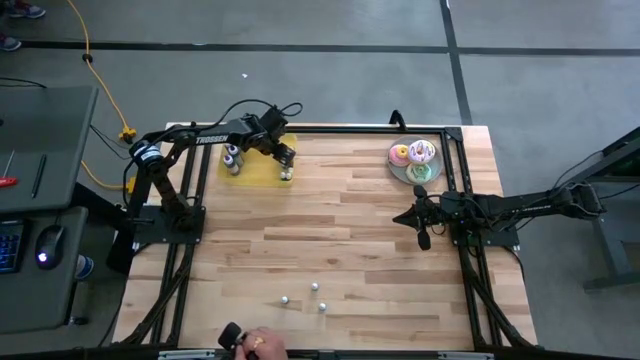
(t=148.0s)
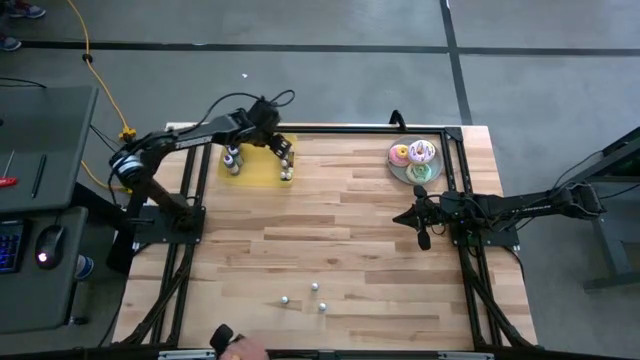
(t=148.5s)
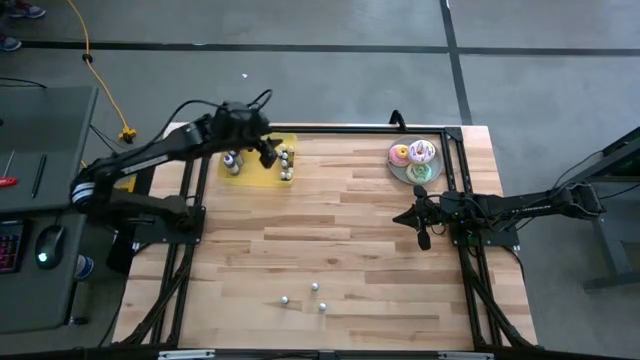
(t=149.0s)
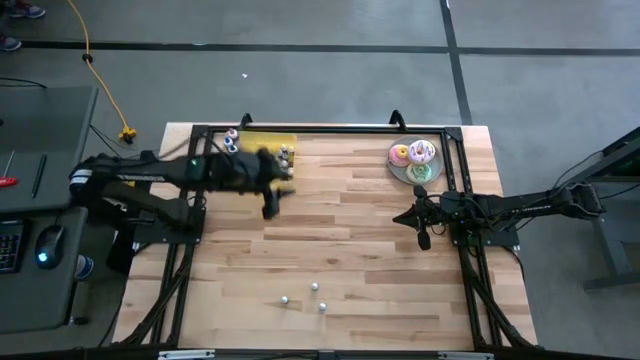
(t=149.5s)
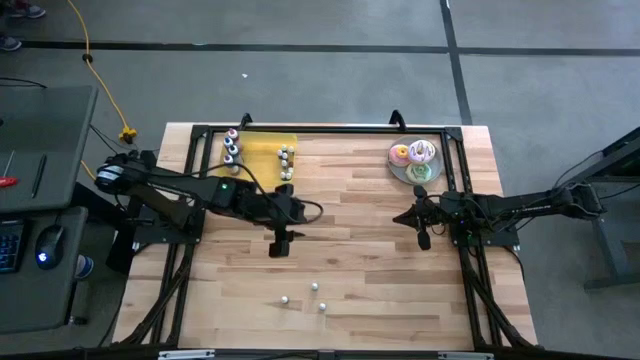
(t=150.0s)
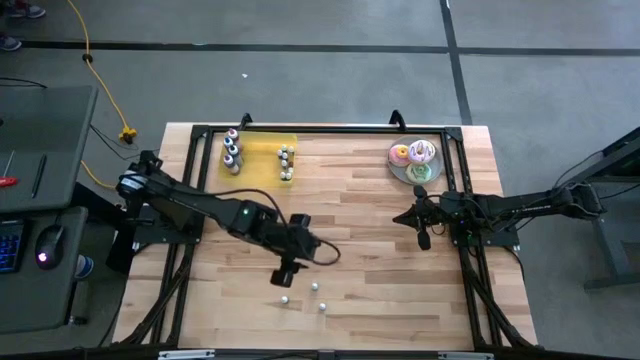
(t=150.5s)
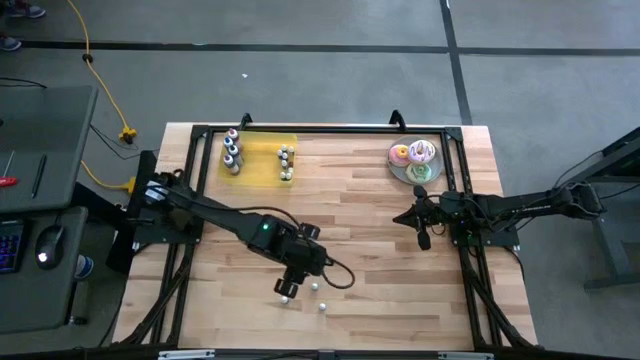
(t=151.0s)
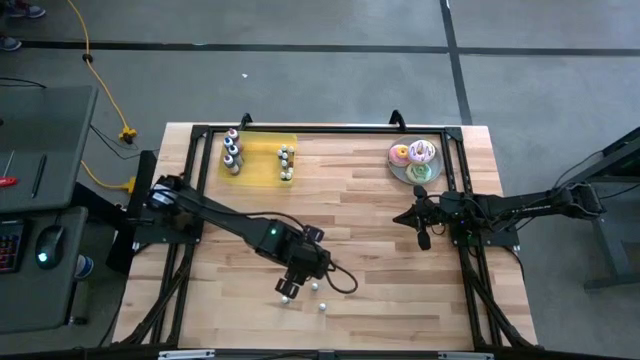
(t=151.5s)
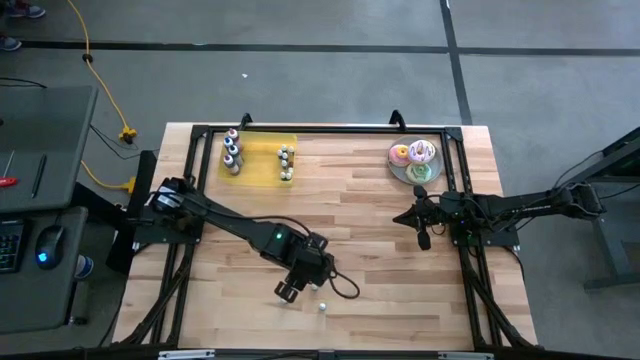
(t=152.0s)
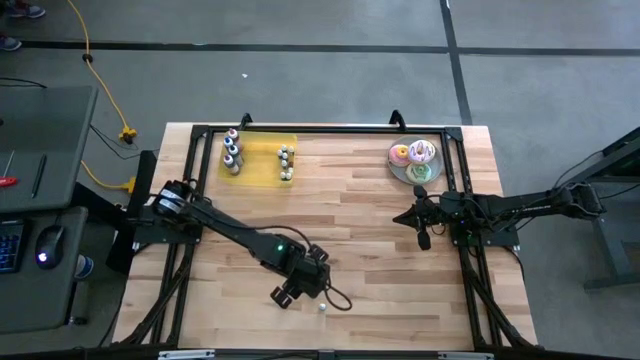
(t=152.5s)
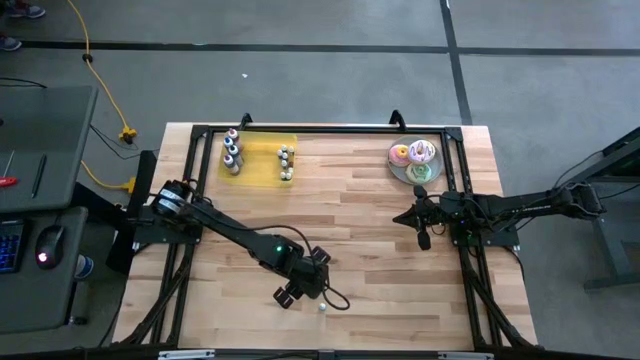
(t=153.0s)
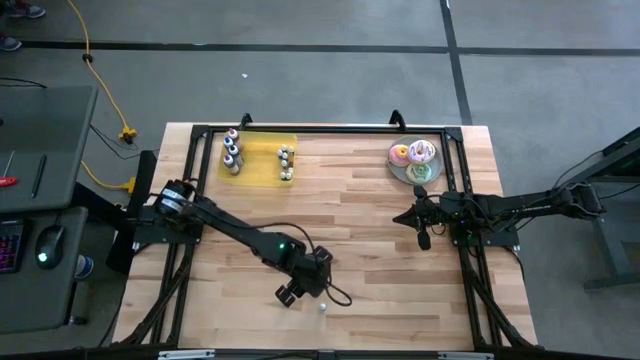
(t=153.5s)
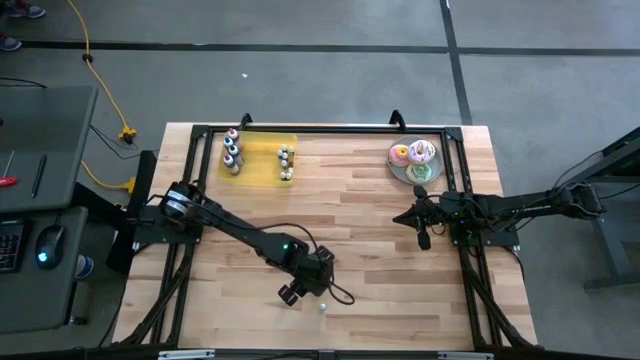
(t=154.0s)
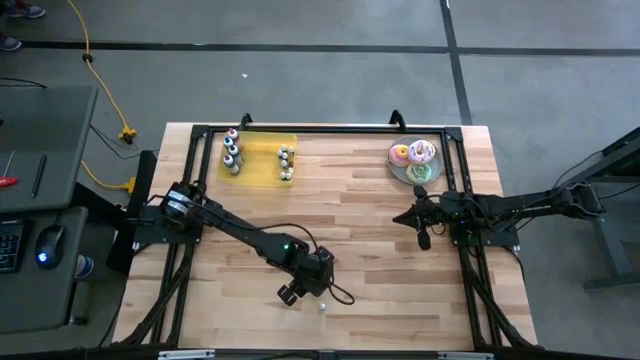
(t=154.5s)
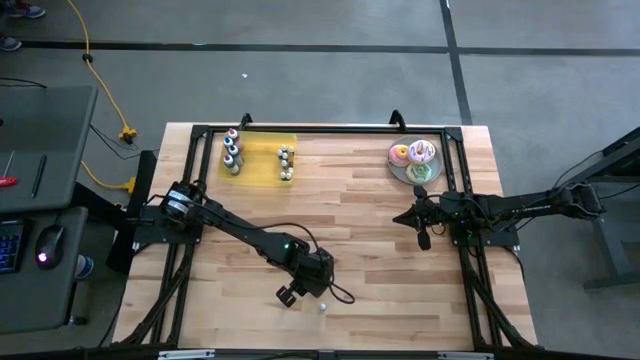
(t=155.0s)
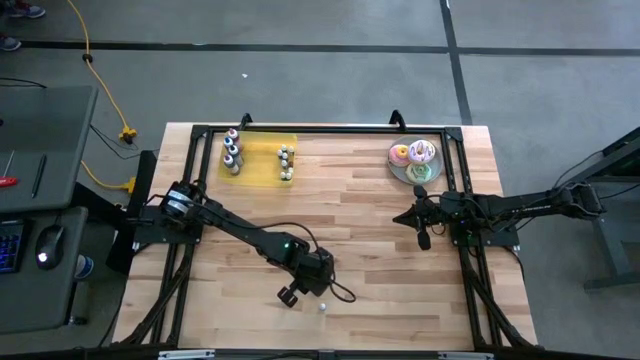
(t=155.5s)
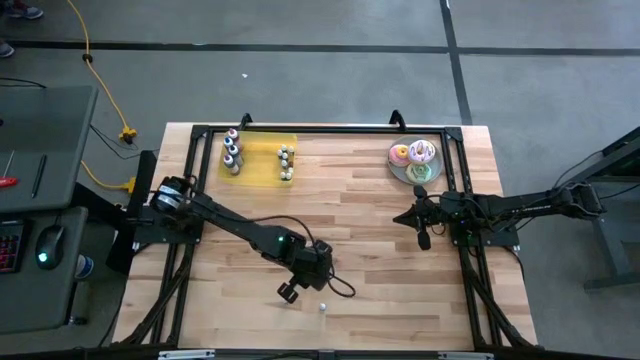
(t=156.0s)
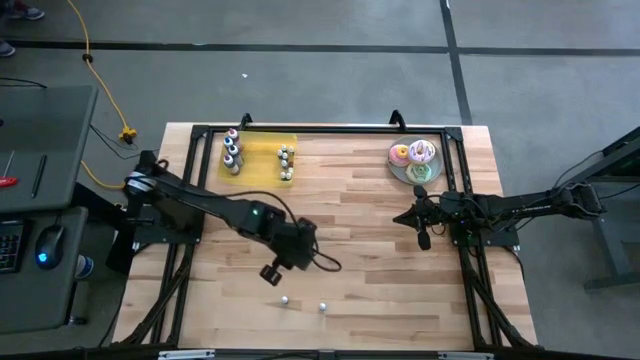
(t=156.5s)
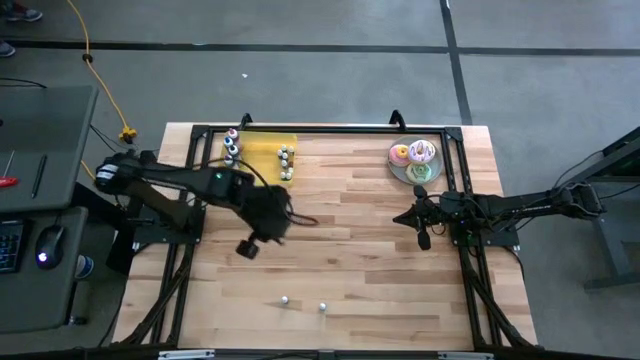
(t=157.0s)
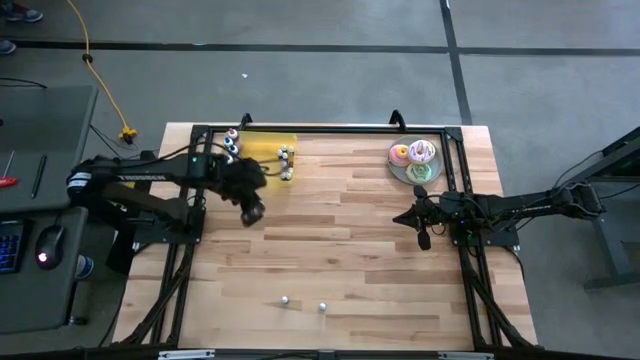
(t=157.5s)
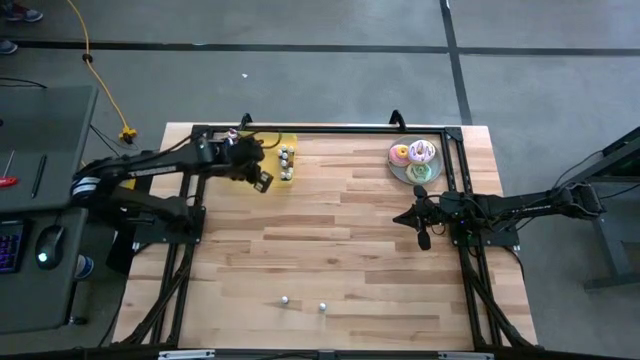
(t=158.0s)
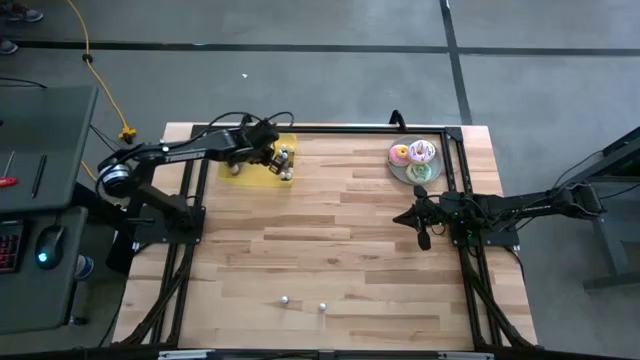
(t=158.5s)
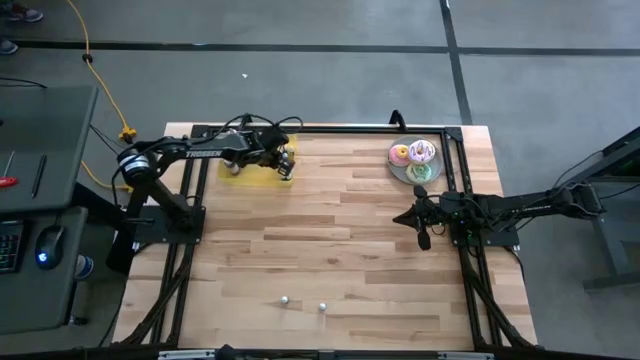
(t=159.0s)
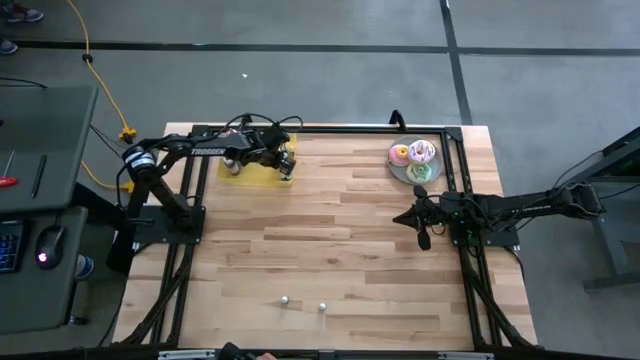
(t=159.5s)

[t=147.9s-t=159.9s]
Task: Pick & Place food coloring
Put the small black food coloring bottle into the yellow bin

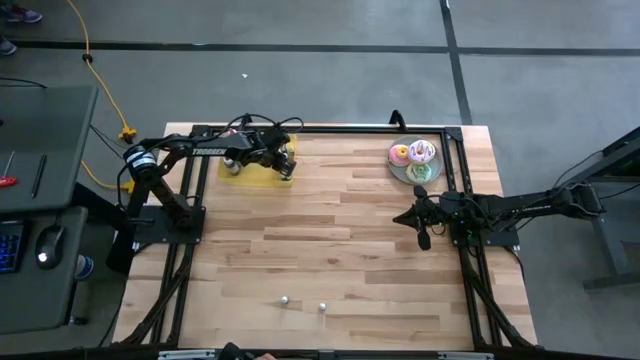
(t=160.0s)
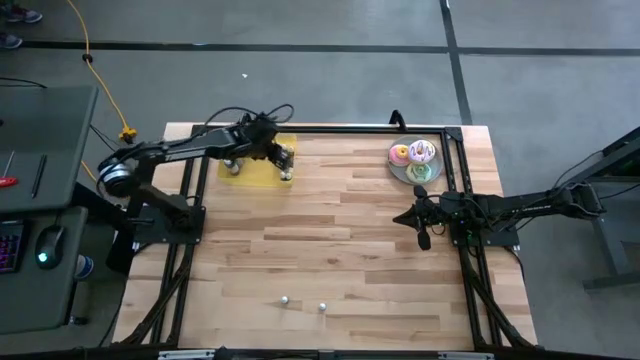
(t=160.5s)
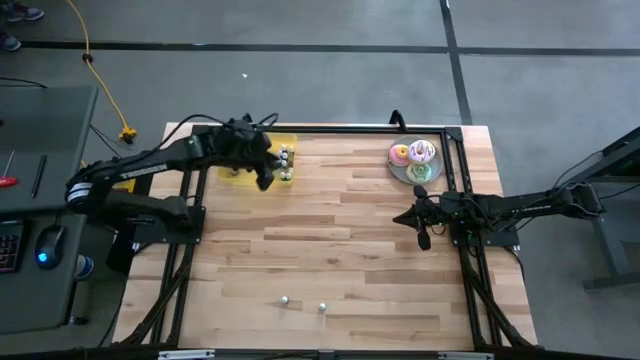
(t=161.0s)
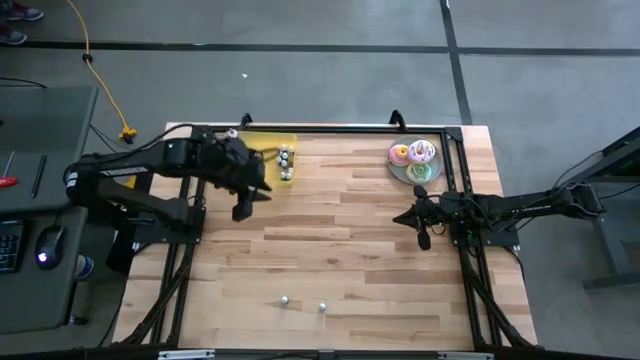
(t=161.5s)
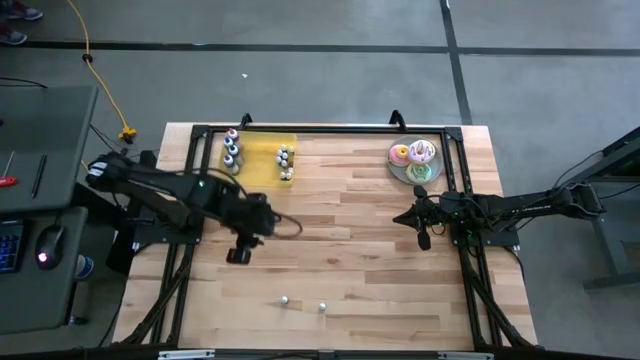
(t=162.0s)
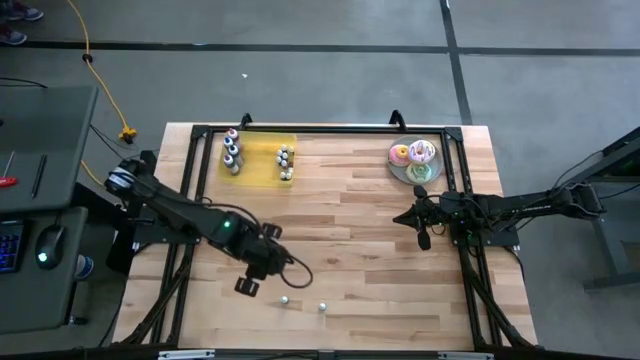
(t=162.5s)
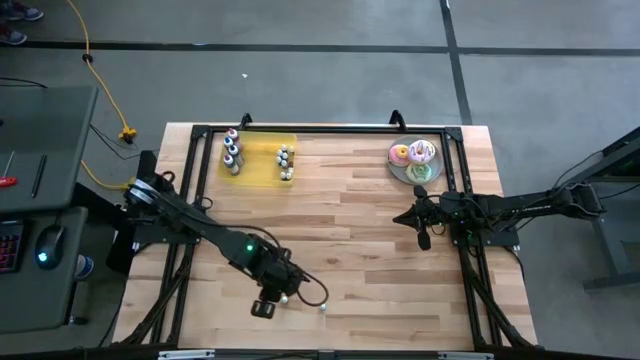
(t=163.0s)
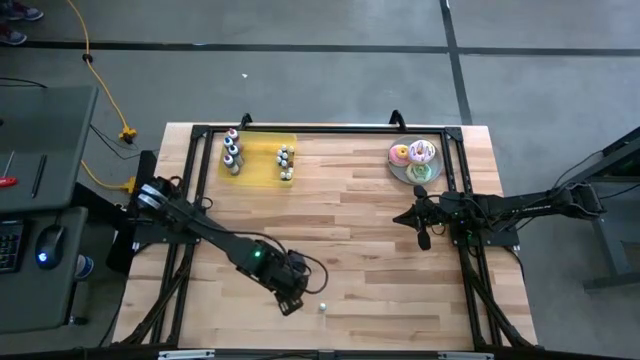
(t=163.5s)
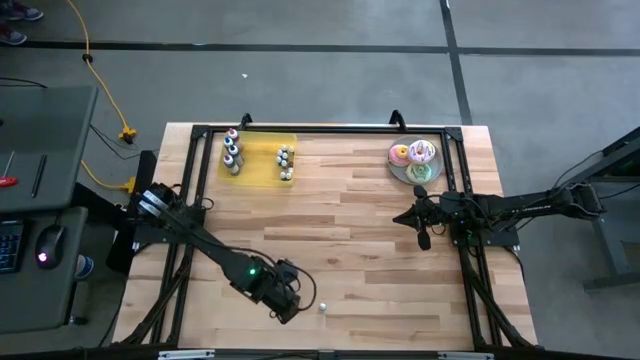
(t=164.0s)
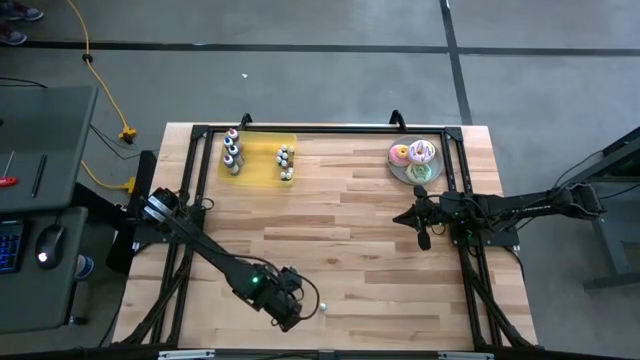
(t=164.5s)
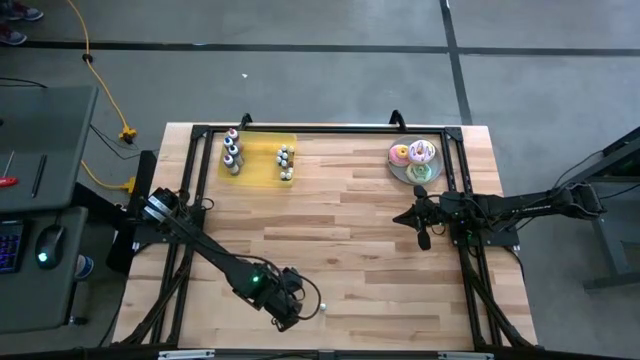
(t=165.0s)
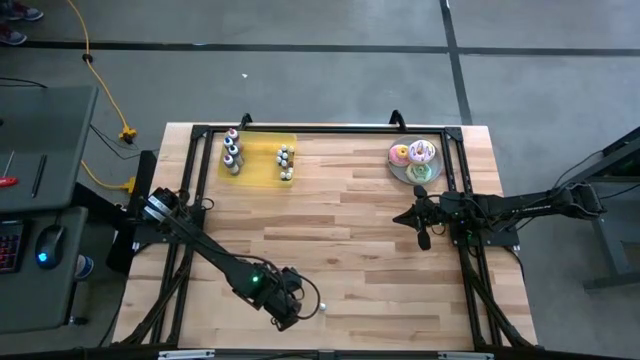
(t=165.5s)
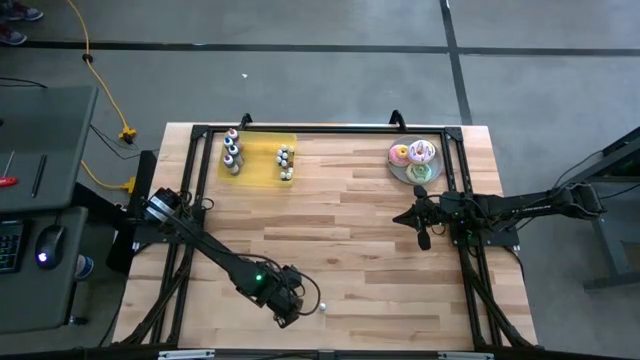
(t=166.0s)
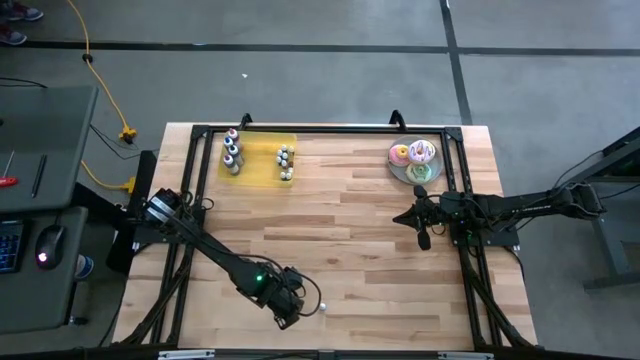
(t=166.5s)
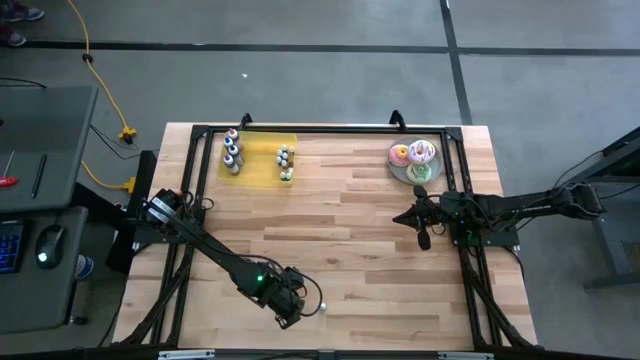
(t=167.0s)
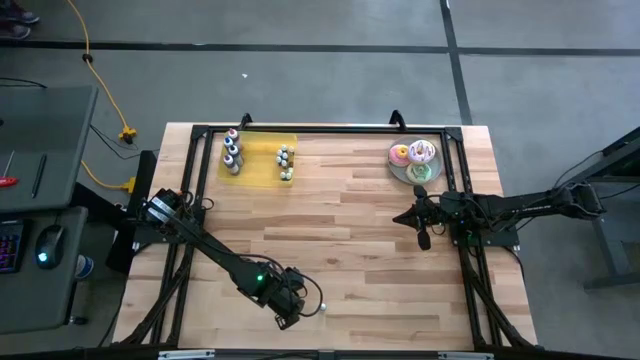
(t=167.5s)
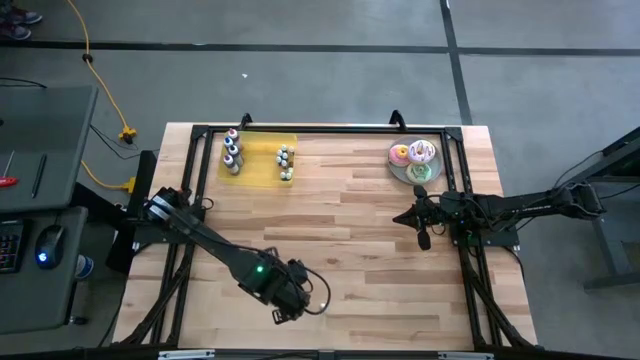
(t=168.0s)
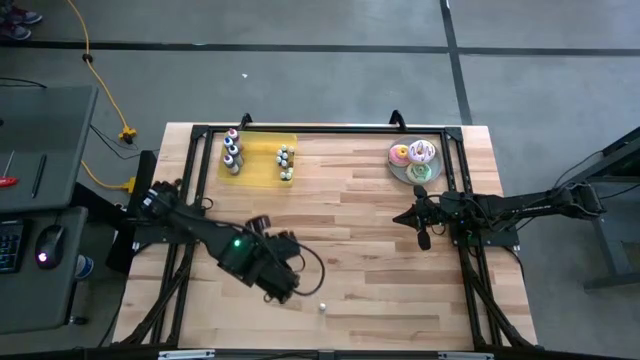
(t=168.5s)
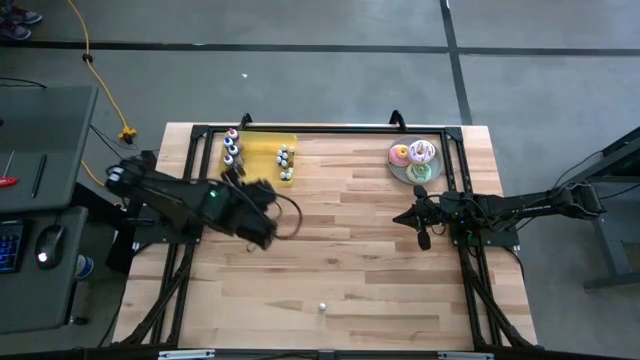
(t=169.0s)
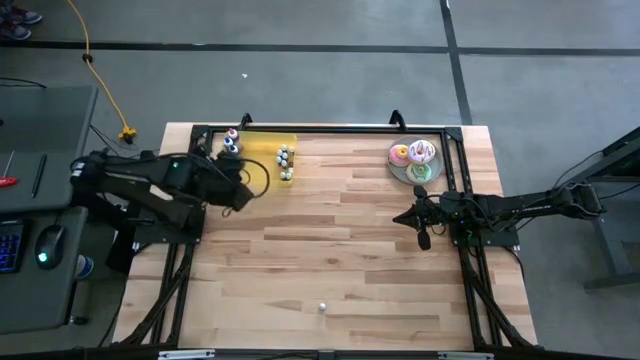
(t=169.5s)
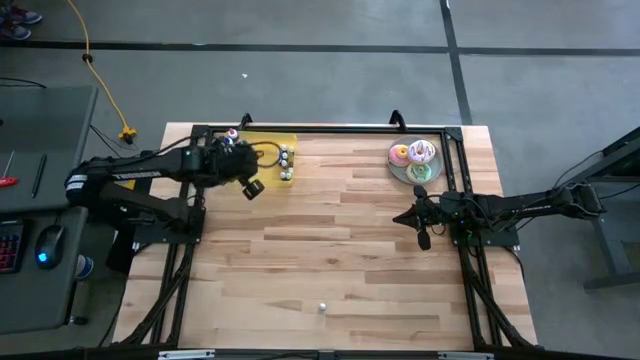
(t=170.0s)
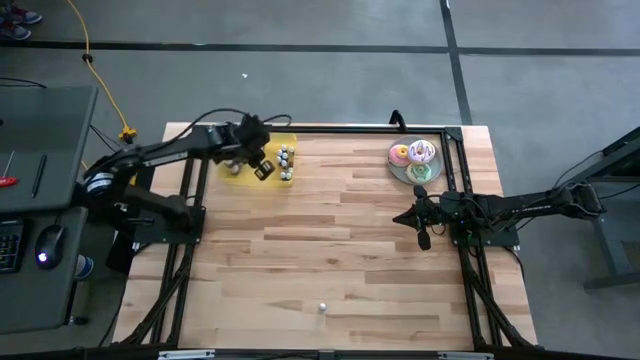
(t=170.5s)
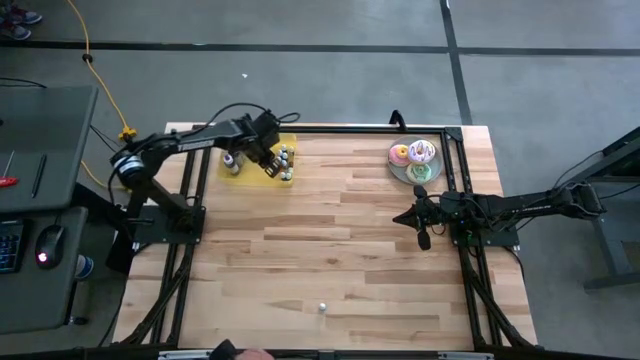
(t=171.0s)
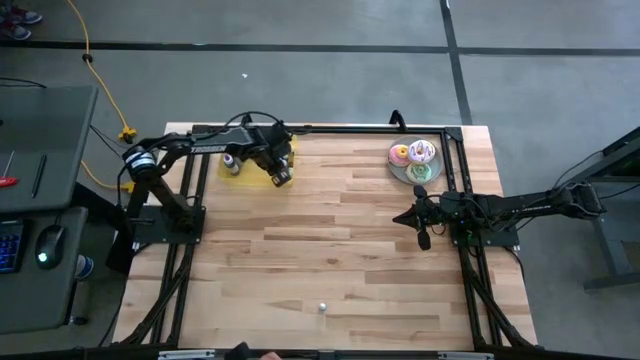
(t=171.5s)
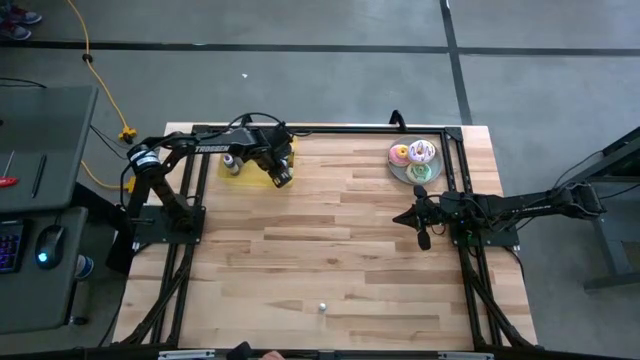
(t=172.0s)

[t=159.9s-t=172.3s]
Put the small green food coloring bottle into the yellow bin
